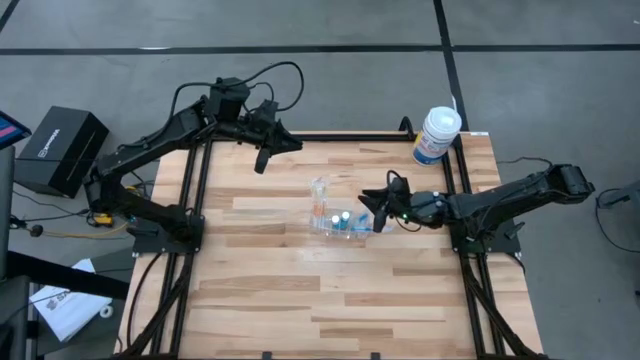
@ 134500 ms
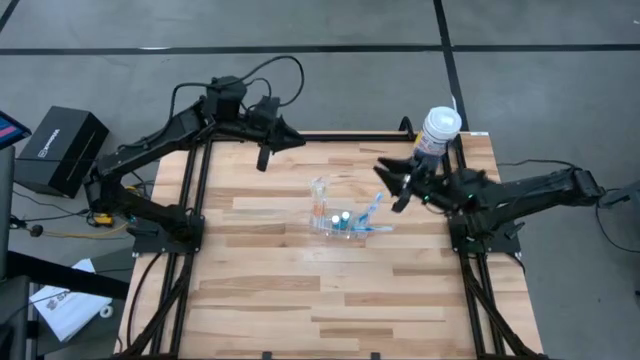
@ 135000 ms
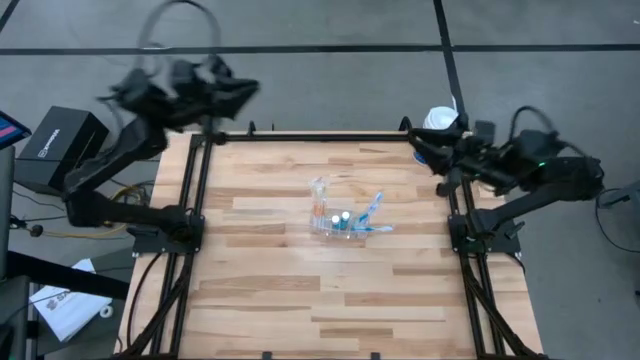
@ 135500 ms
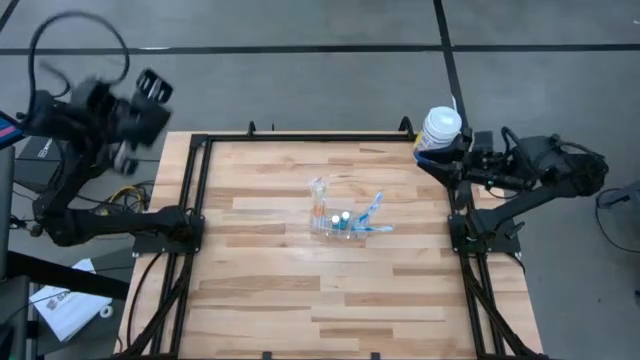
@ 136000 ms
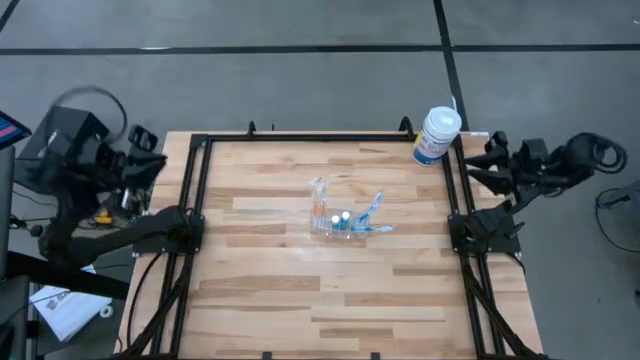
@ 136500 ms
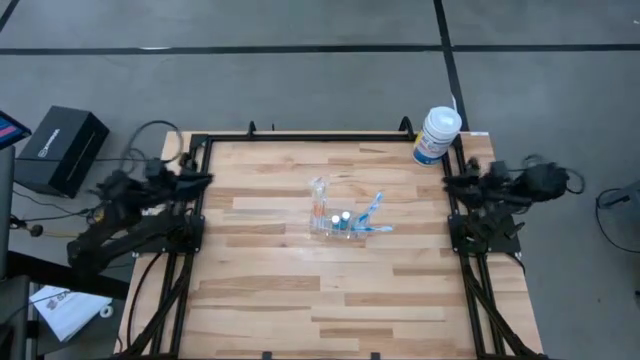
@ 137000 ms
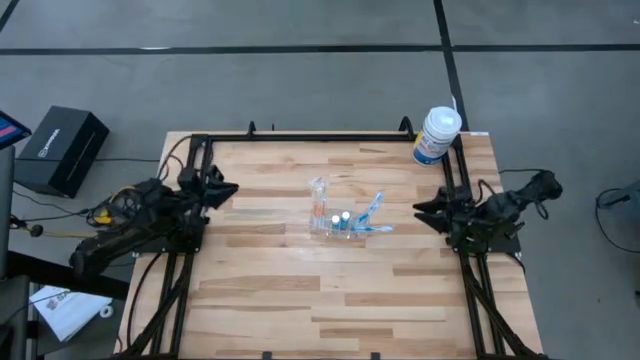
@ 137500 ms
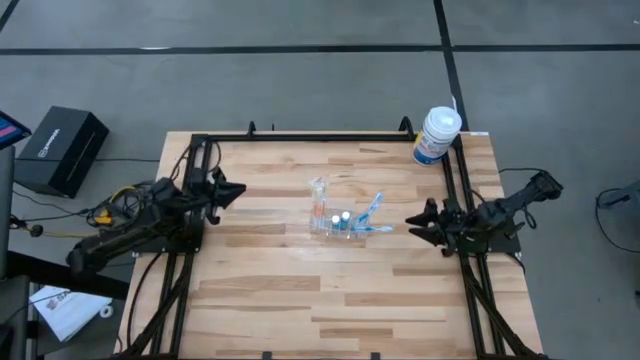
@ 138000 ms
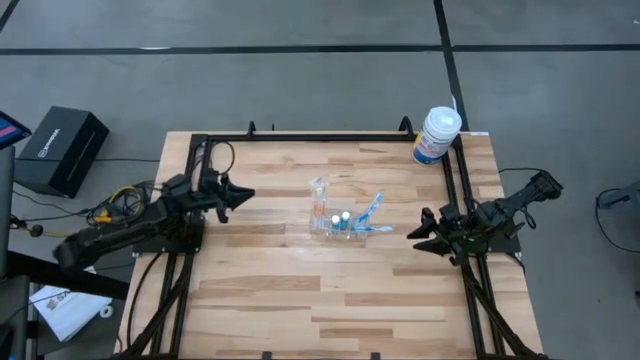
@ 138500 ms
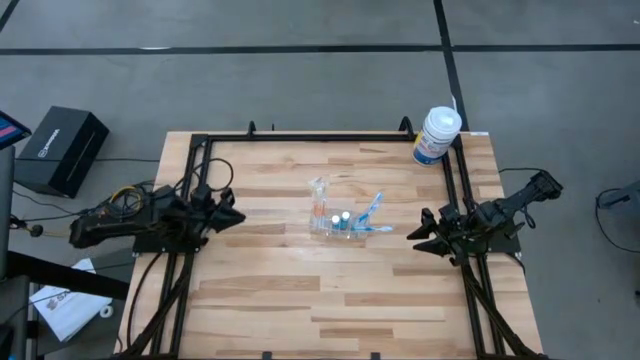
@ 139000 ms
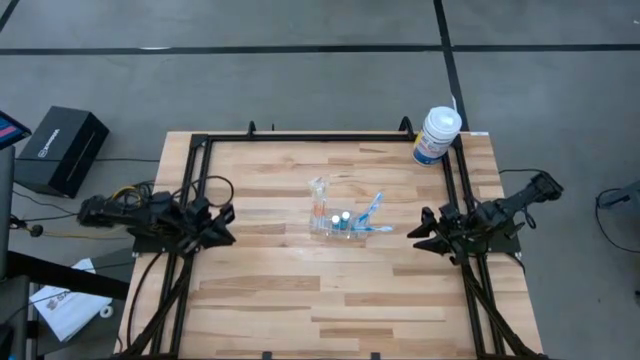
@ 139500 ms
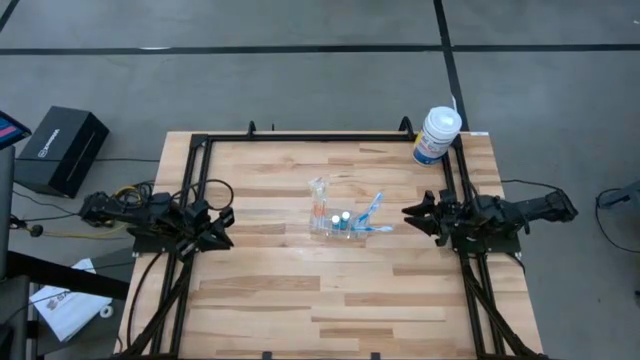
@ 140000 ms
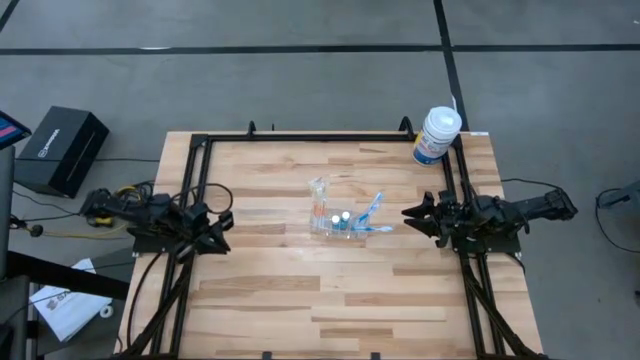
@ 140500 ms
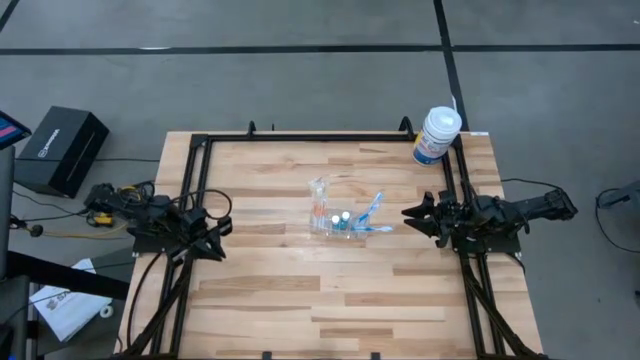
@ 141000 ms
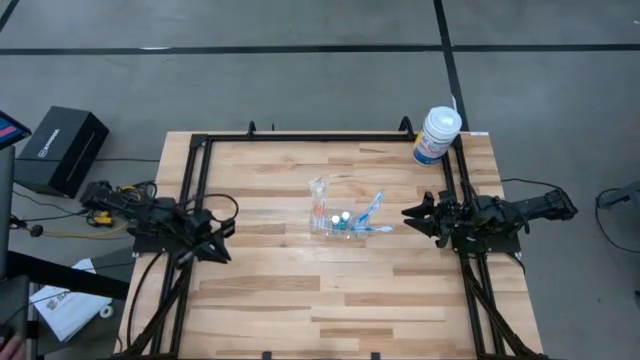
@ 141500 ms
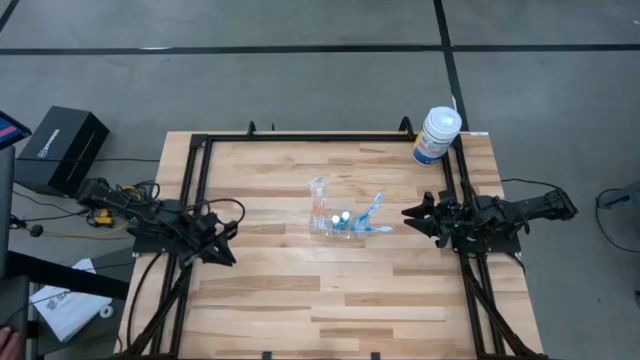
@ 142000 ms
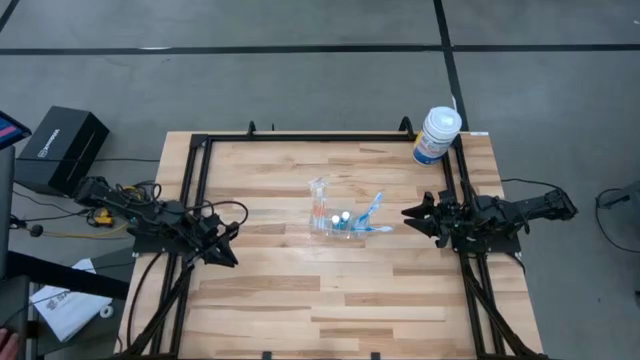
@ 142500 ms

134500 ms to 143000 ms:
Task: Pick & Place toothbrushing station
Return to Home Position

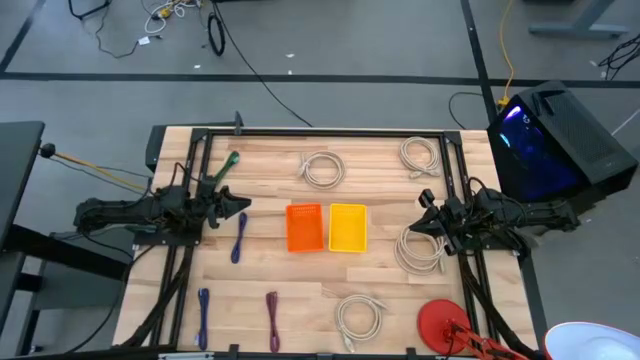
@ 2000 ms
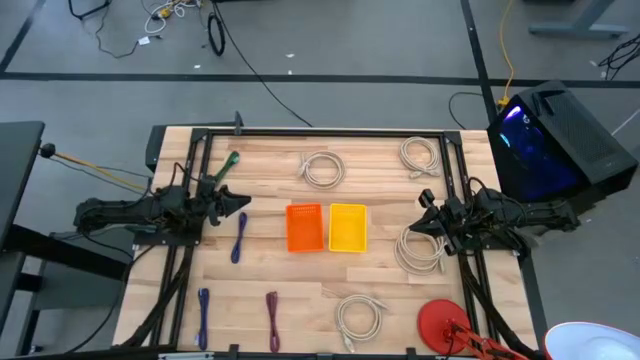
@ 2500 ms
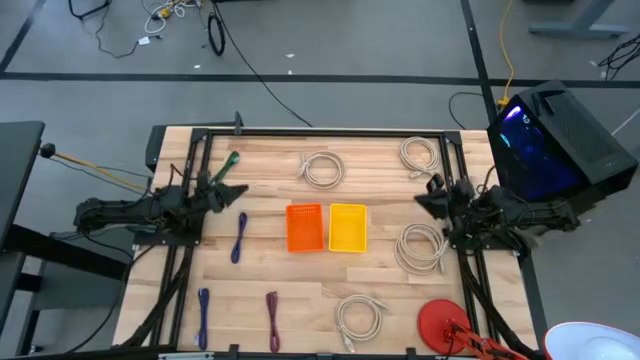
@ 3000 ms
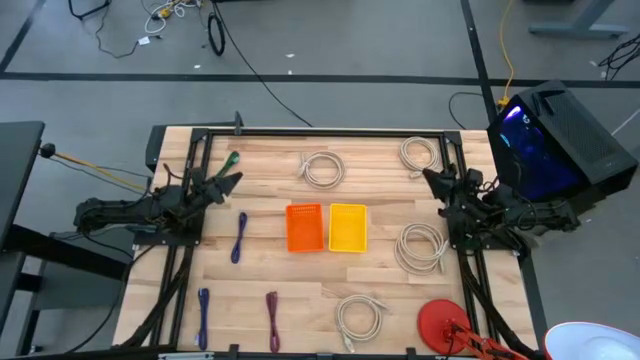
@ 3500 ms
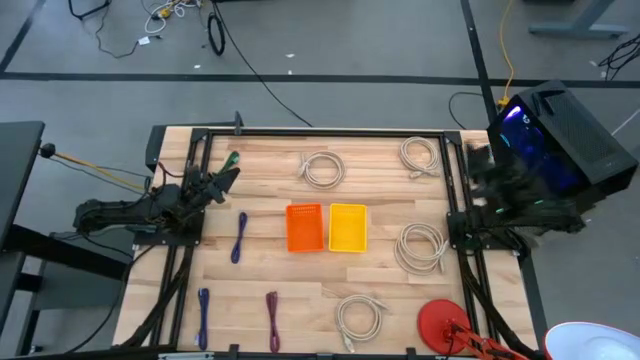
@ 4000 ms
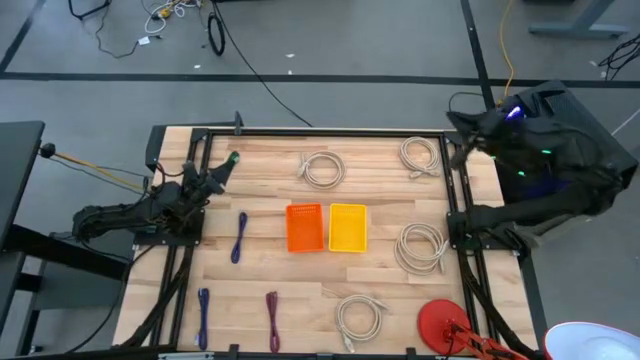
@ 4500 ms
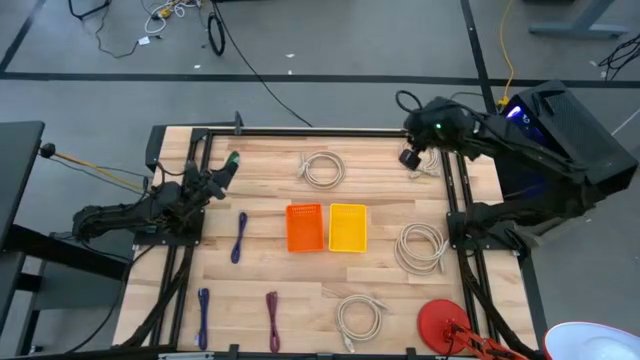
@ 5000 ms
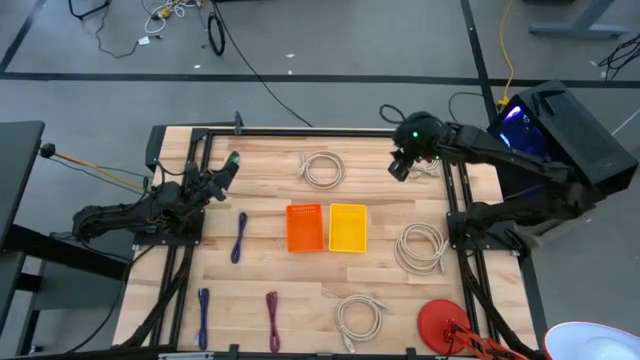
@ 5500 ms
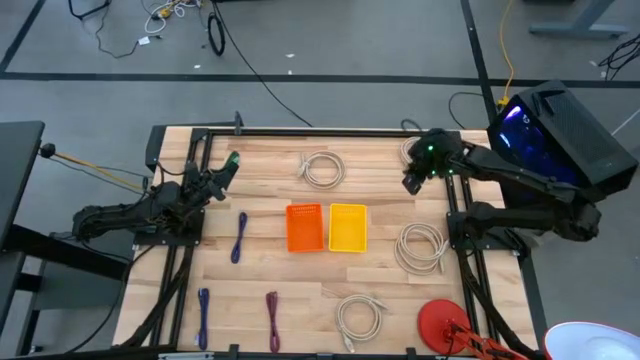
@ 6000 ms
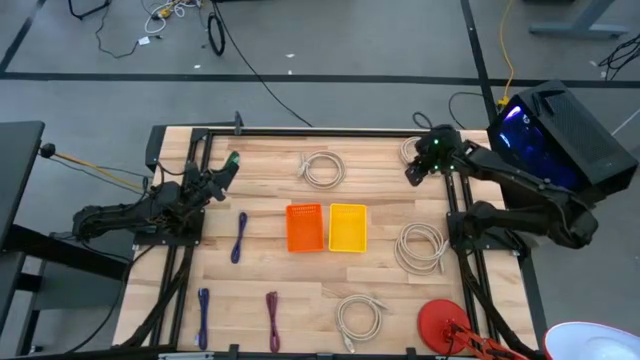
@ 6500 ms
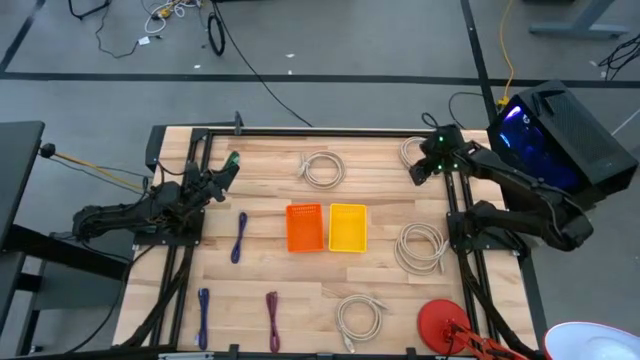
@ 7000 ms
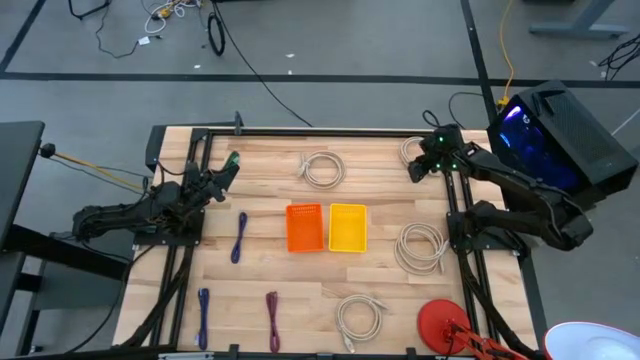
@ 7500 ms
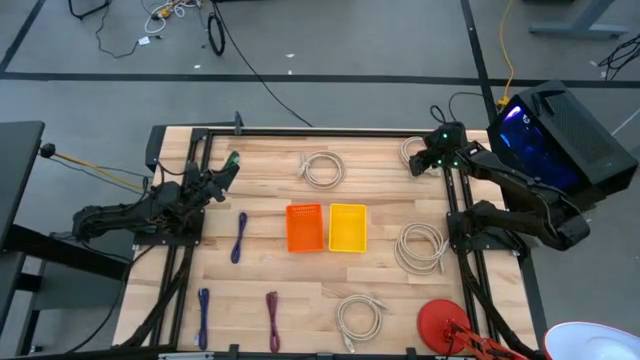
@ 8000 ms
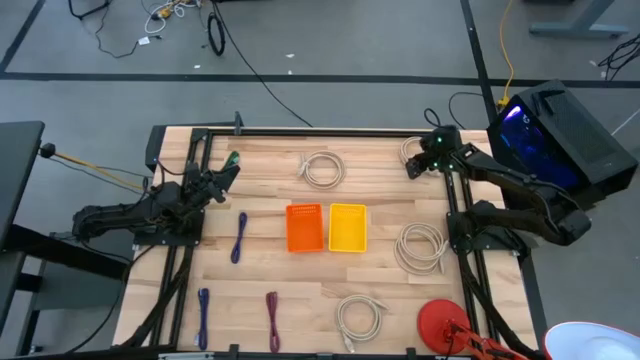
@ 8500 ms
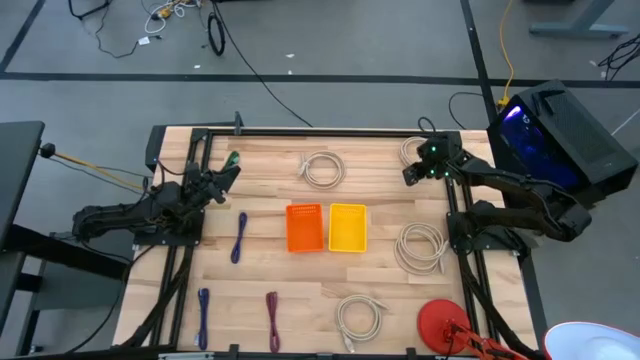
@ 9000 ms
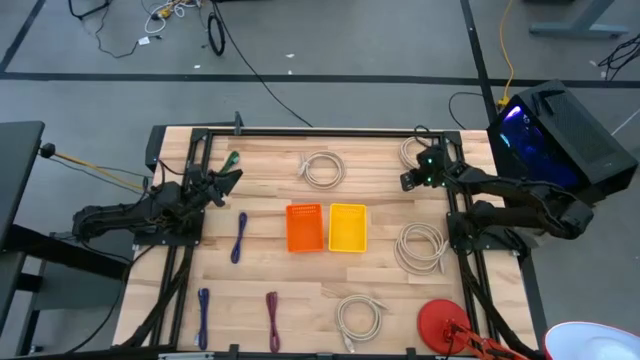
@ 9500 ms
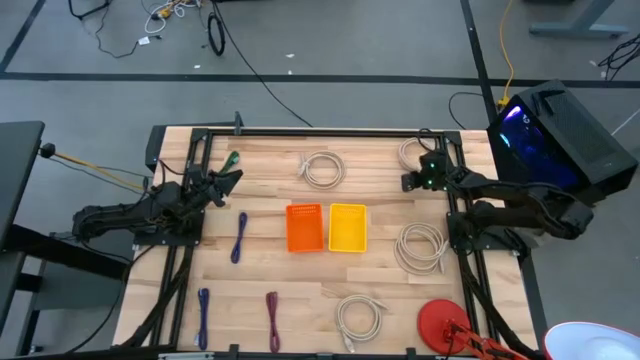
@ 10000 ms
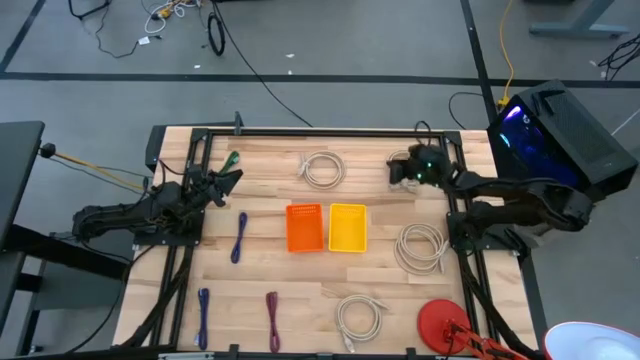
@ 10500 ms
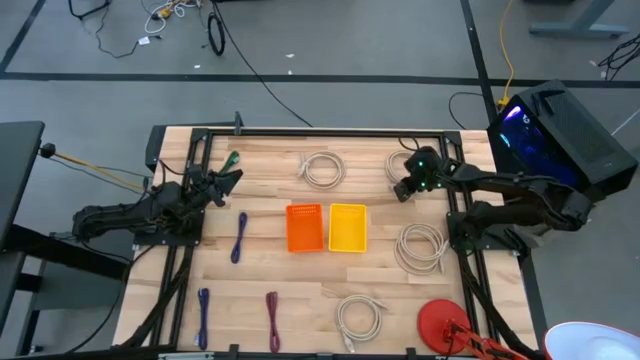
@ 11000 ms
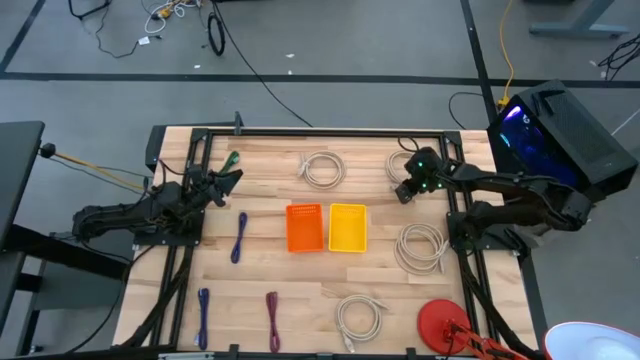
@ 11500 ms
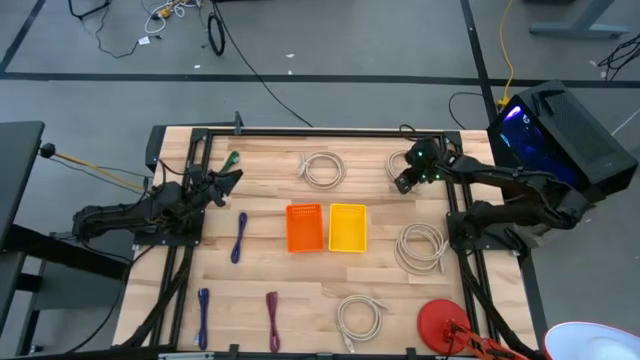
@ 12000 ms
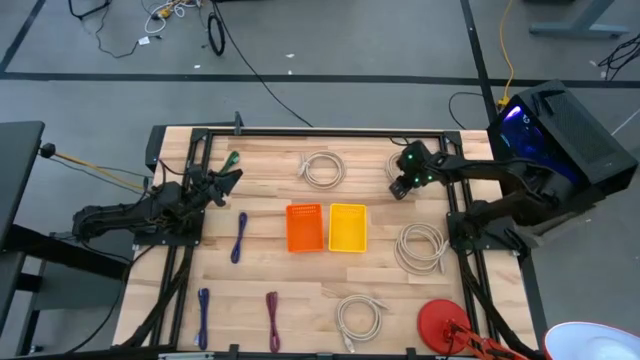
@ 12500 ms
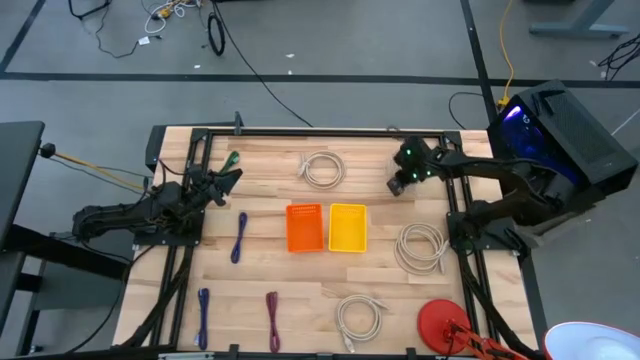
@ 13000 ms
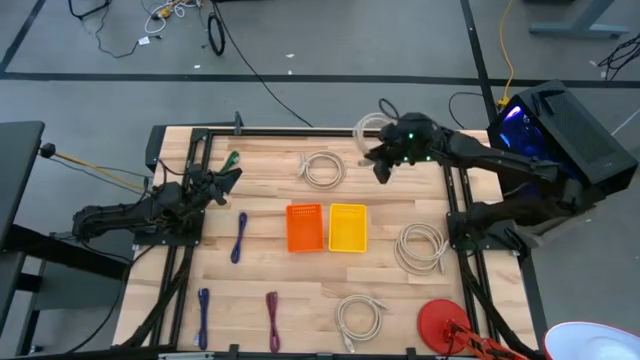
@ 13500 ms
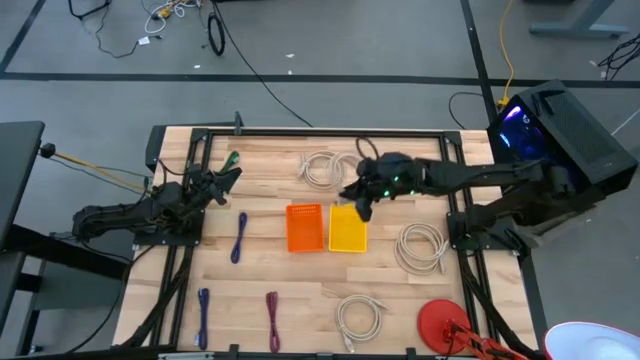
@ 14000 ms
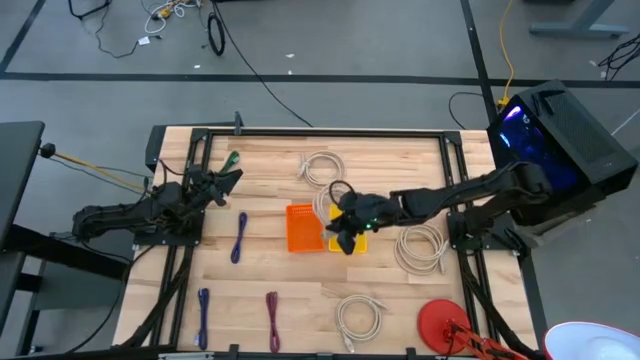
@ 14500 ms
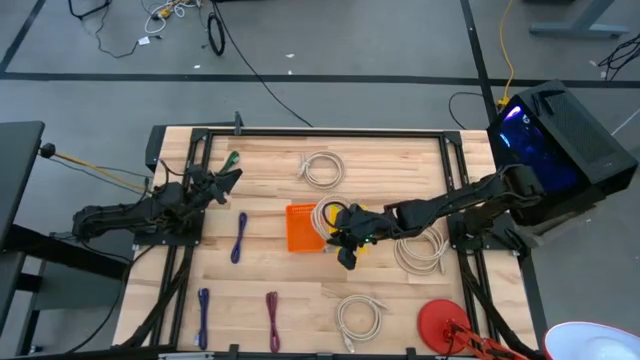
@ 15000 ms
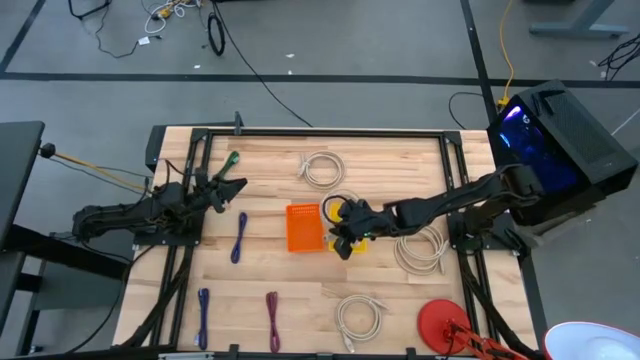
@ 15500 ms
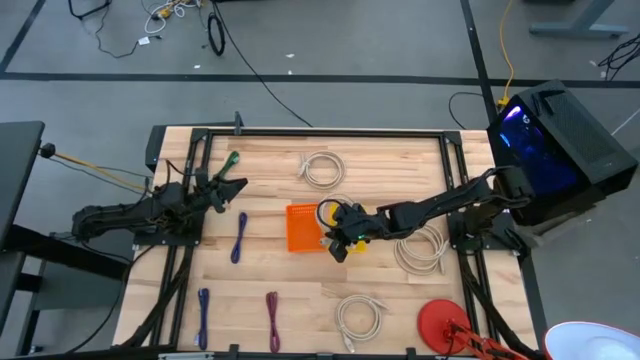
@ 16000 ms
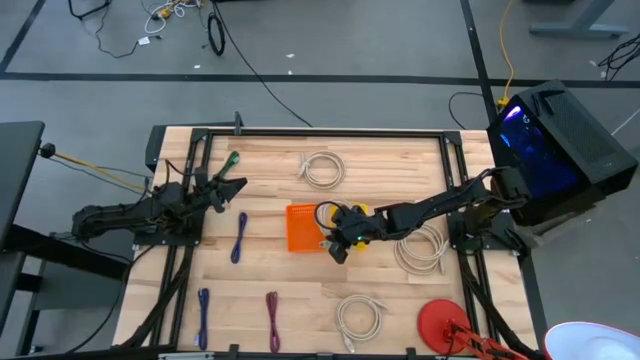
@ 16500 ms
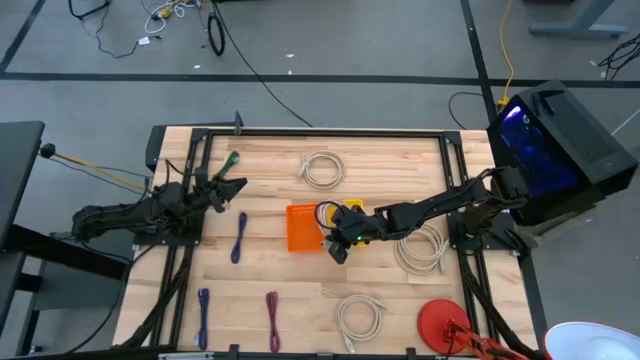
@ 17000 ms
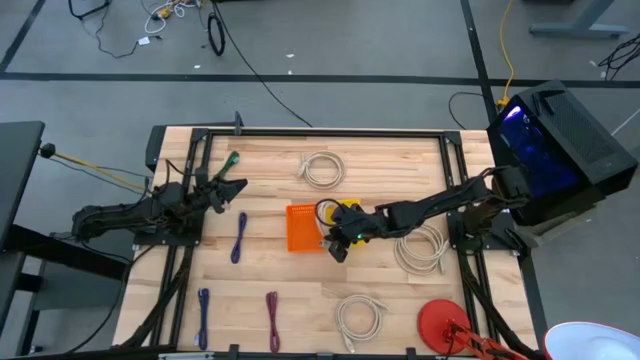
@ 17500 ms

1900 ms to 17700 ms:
Task: Pick & Place USB Port
Put the brown HDMI cable into the yellow bin
